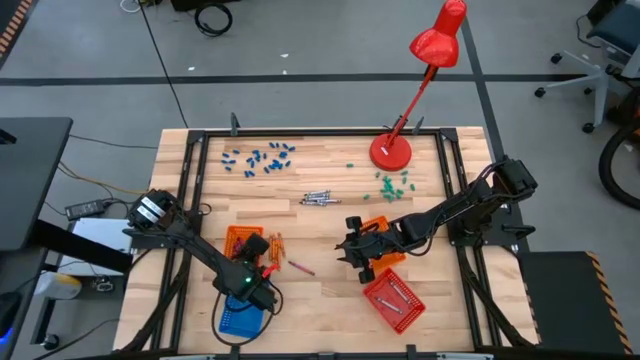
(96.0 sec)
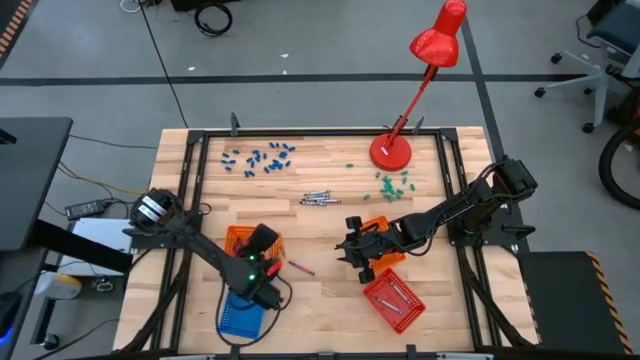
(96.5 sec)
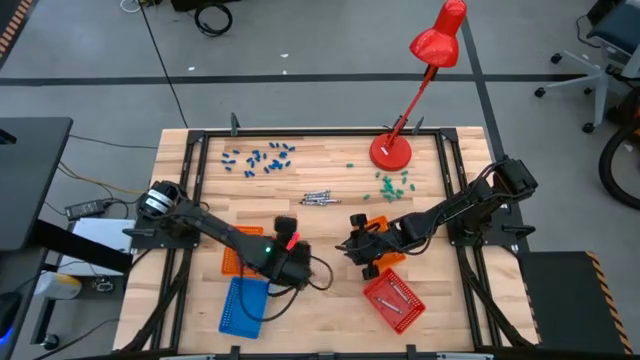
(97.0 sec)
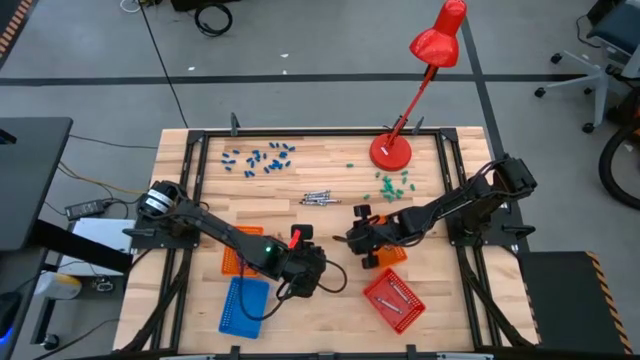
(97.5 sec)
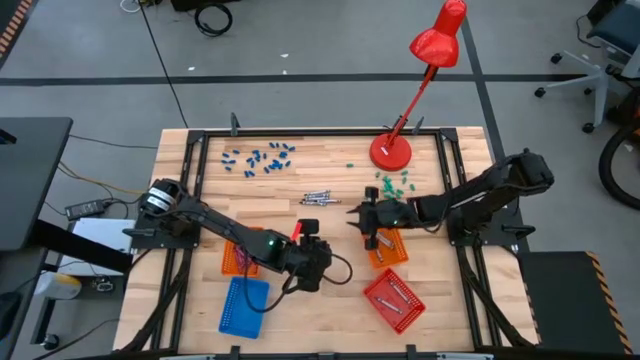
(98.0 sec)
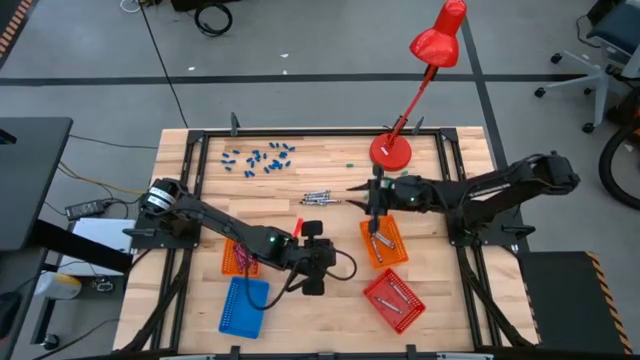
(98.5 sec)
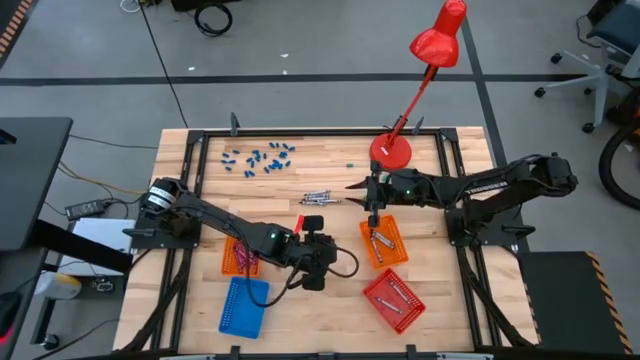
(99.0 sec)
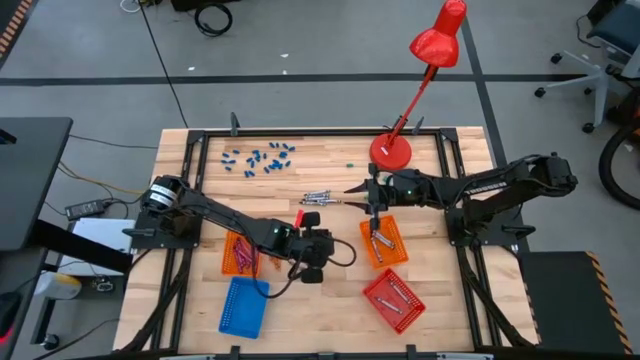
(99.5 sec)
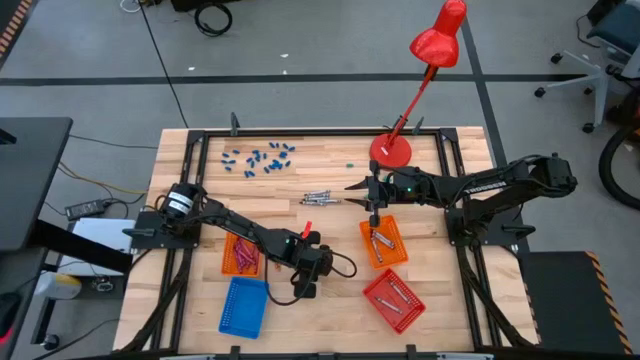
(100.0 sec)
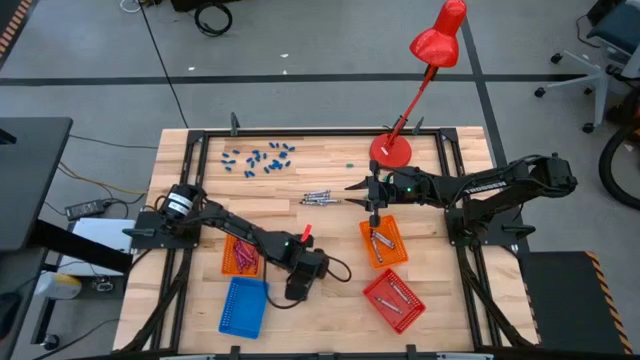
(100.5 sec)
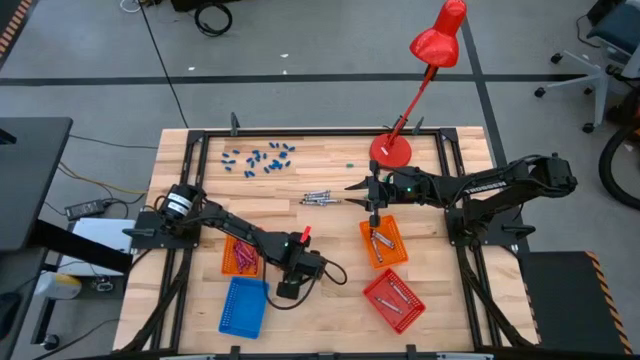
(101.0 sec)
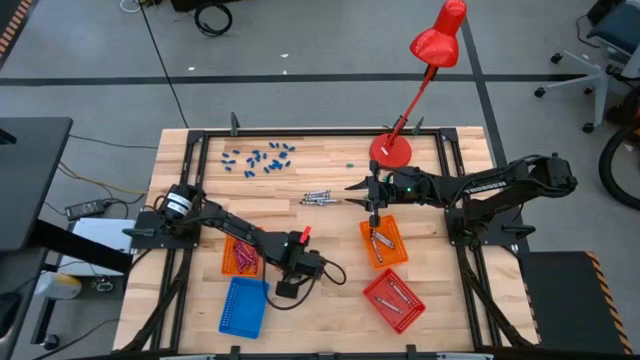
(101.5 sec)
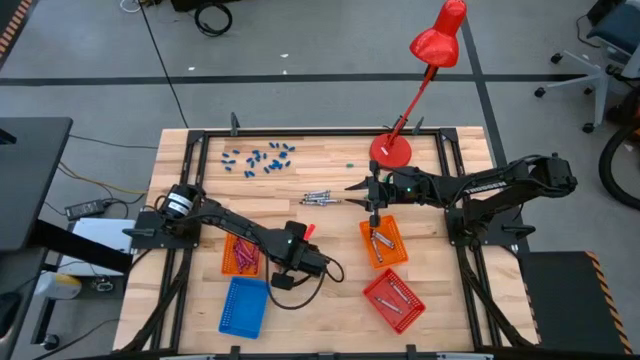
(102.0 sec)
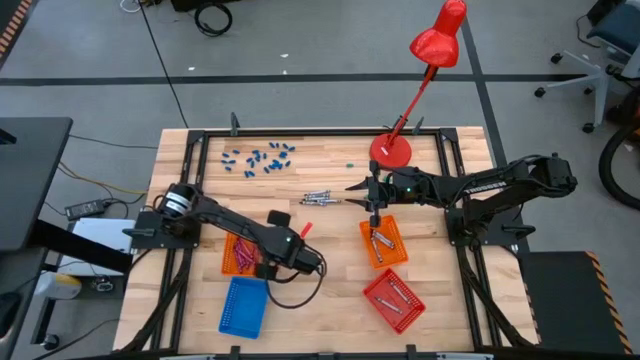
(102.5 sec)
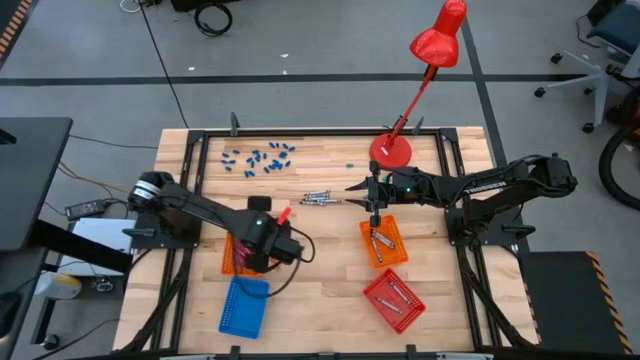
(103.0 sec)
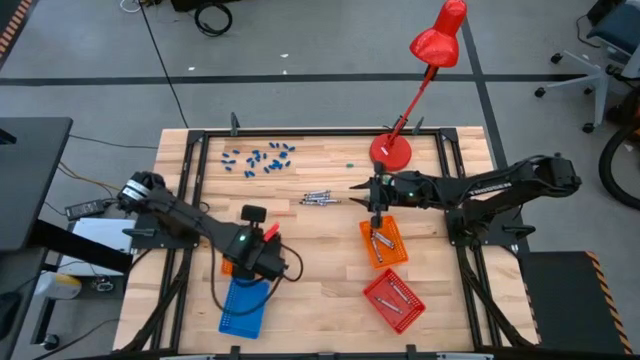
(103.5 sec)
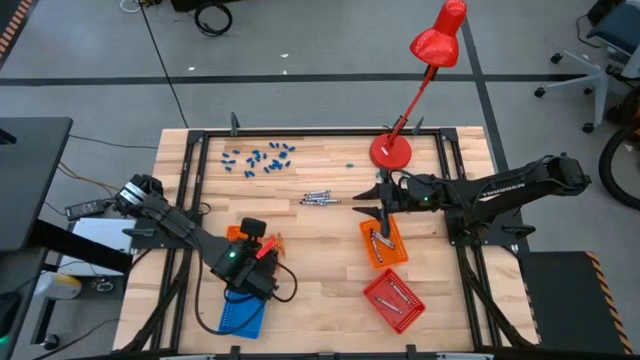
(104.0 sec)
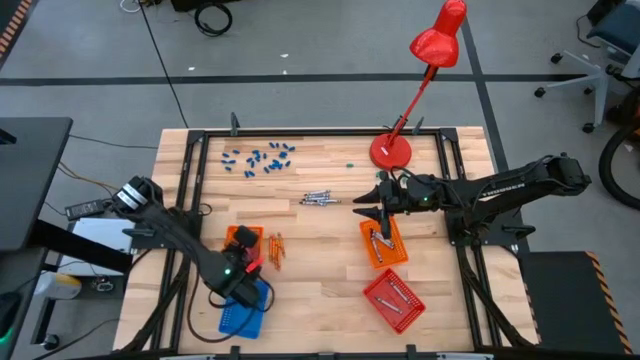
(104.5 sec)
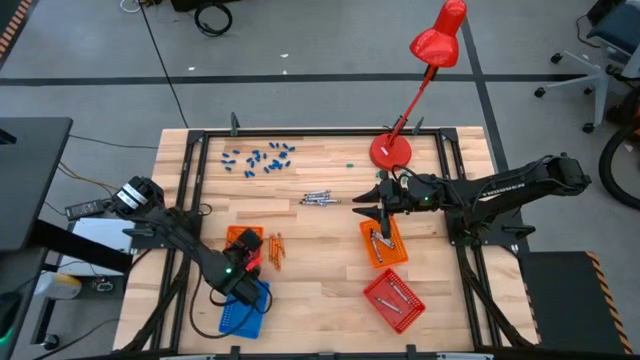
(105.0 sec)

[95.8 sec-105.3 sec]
Task: Sort crayons
Put the red crayon into the left orange bin

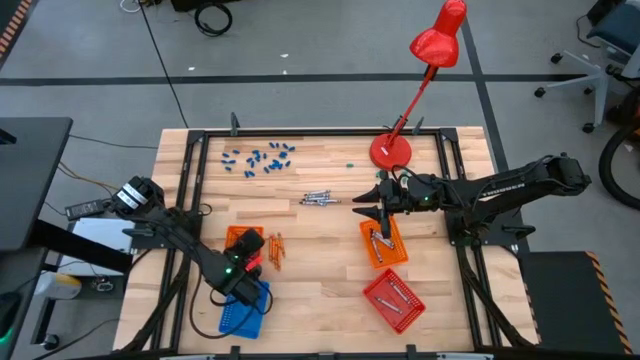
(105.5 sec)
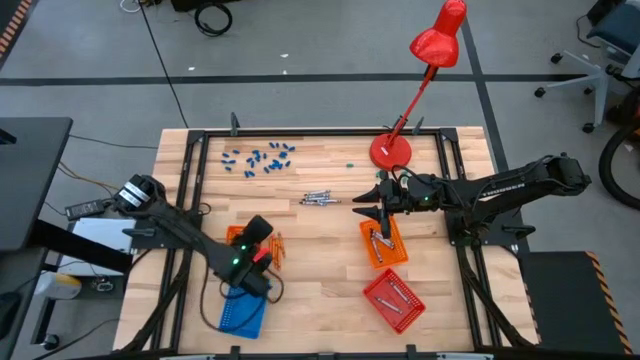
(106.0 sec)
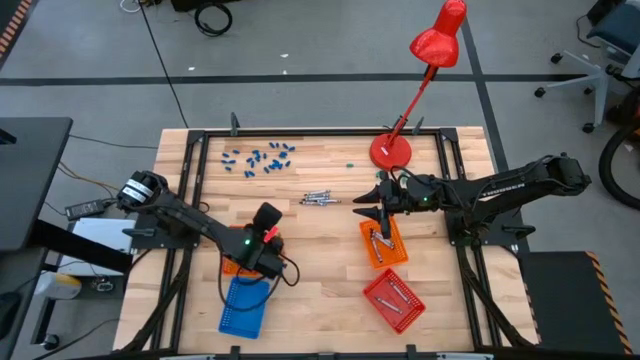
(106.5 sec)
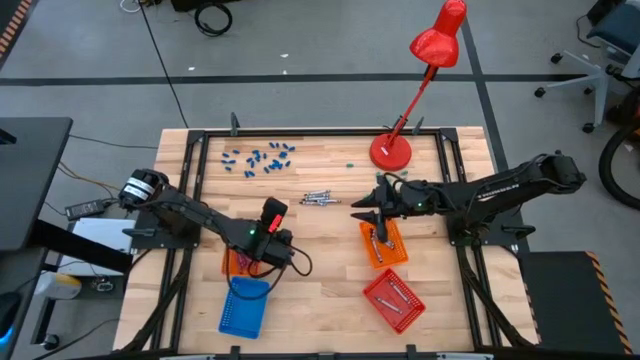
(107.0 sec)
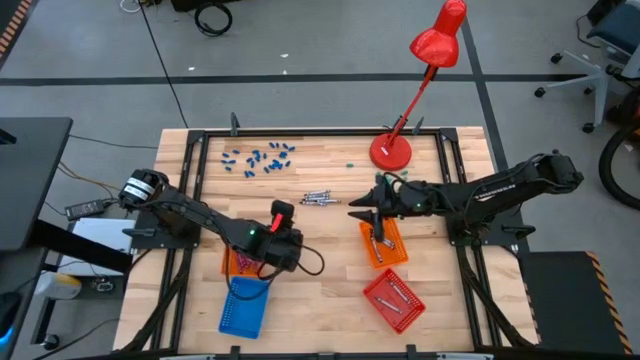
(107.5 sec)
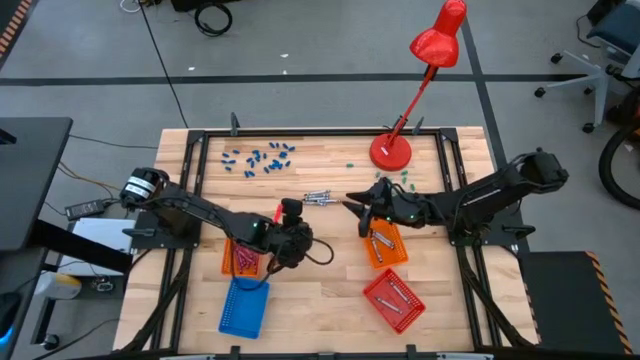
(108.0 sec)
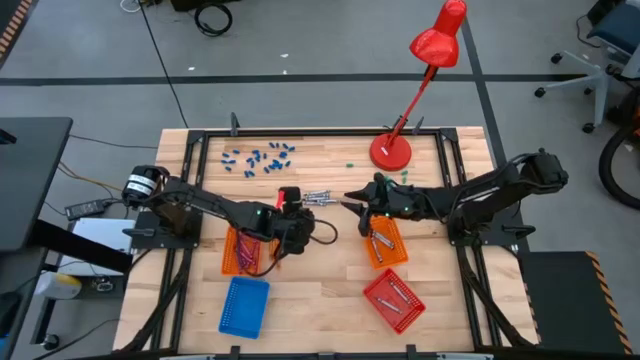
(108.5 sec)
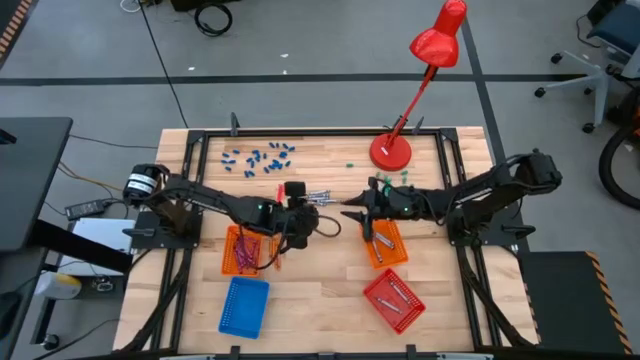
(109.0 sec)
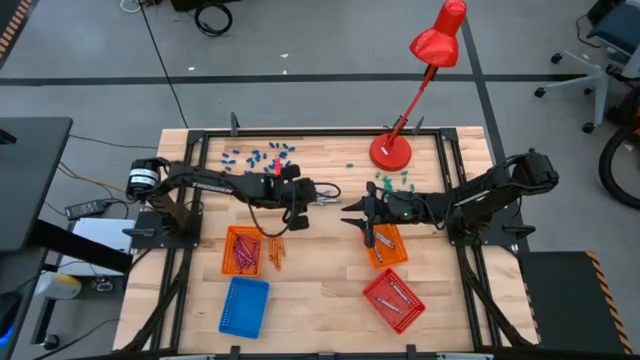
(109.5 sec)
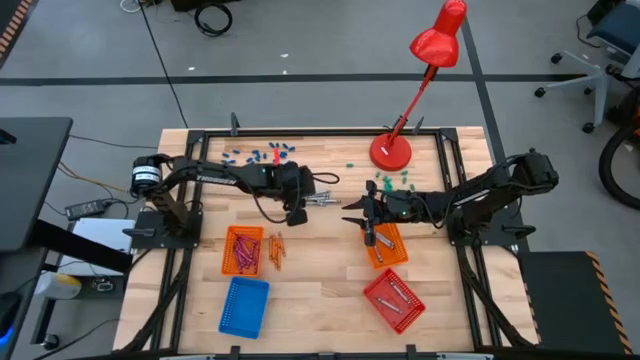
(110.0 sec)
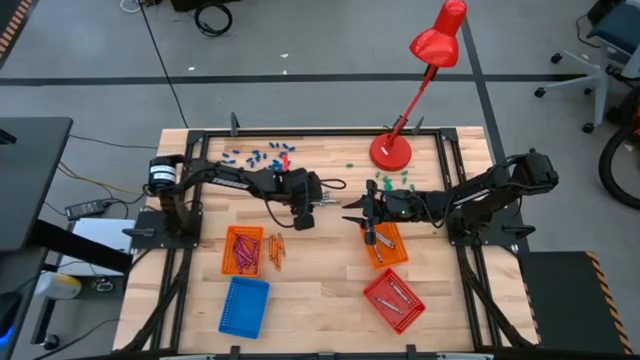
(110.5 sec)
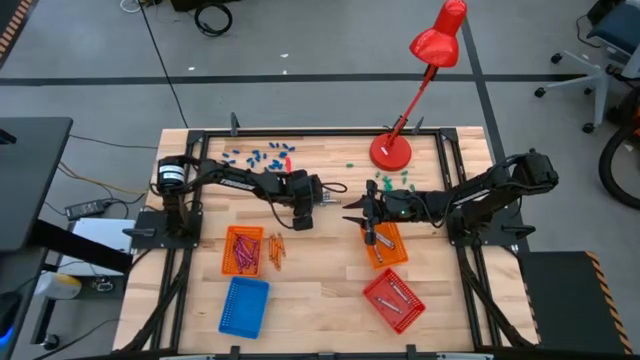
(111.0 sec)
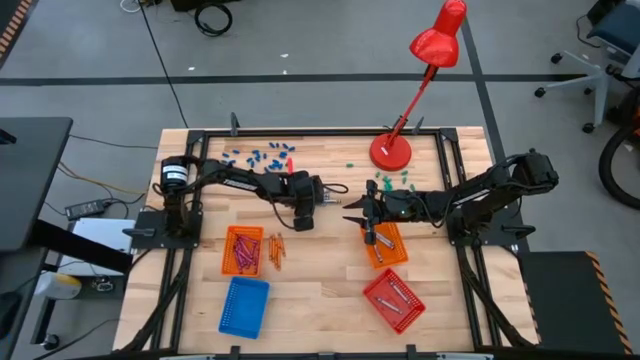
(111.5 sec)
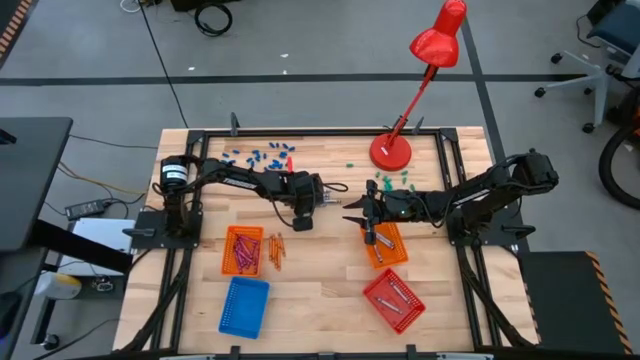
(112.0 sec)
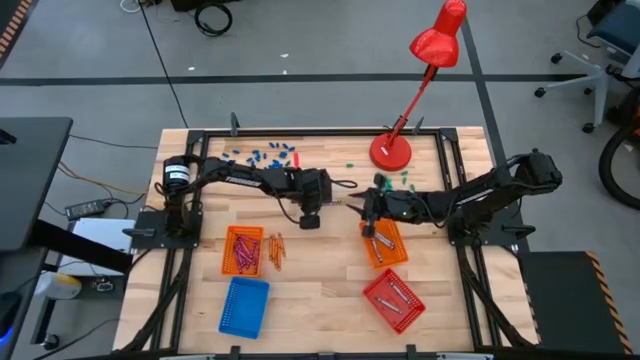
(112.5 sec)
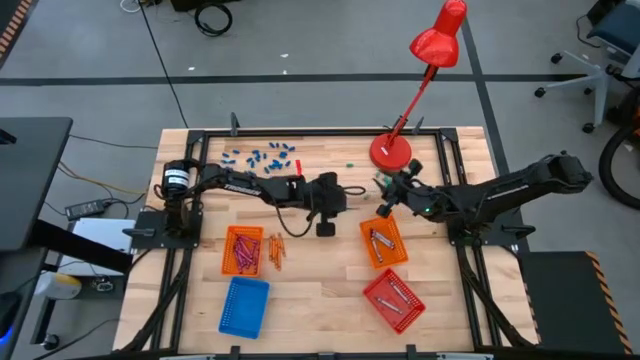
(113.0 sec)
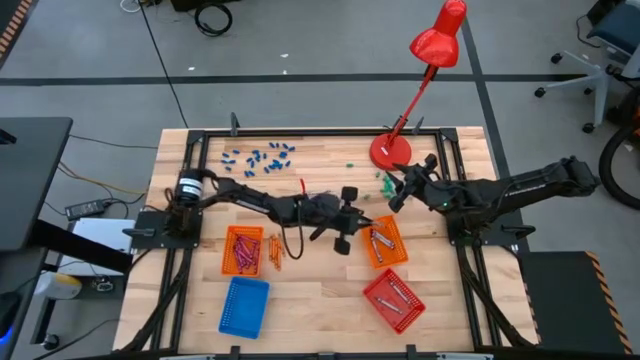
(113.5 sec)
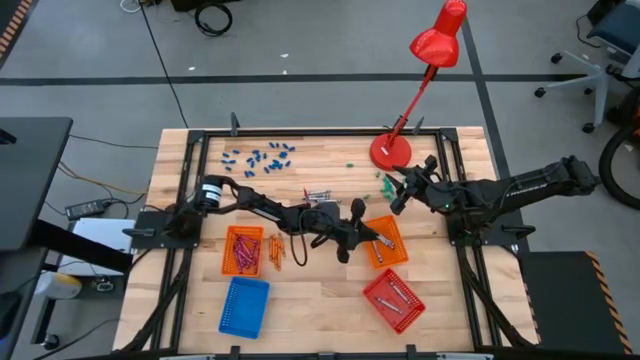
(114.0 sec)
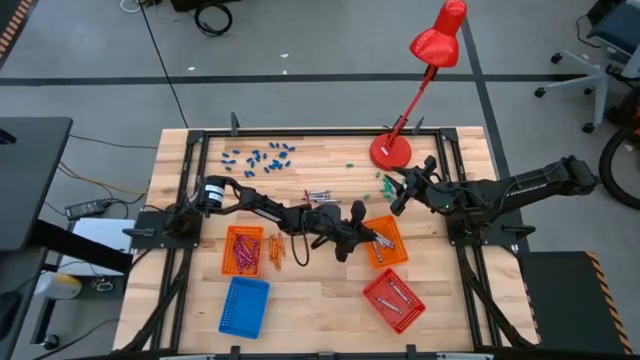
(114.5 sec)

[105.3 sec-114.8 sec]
Put the black crayon into the right orange bin
